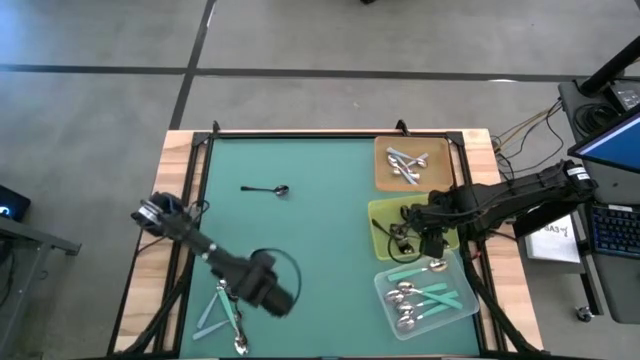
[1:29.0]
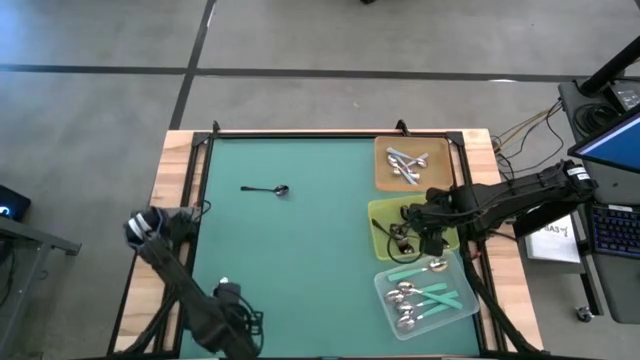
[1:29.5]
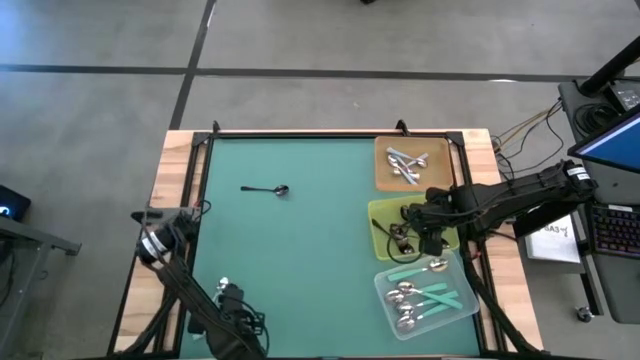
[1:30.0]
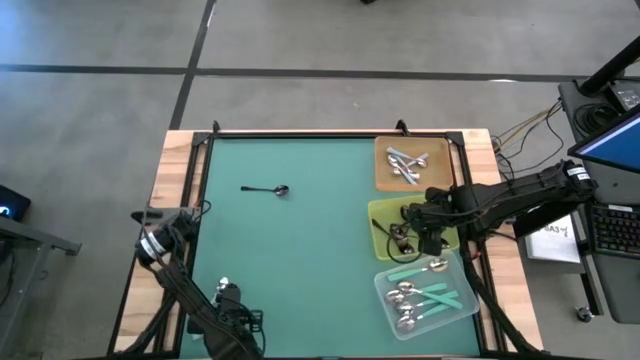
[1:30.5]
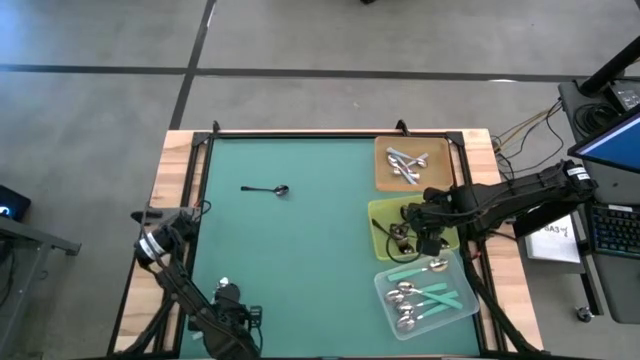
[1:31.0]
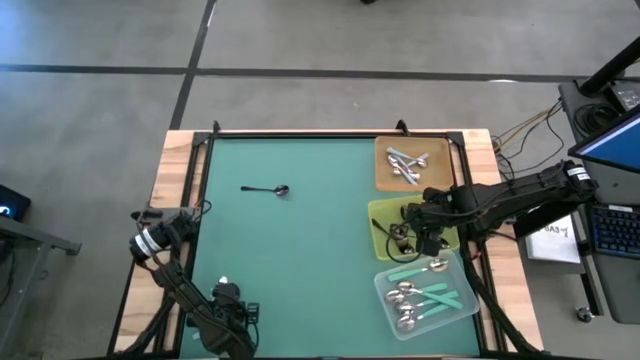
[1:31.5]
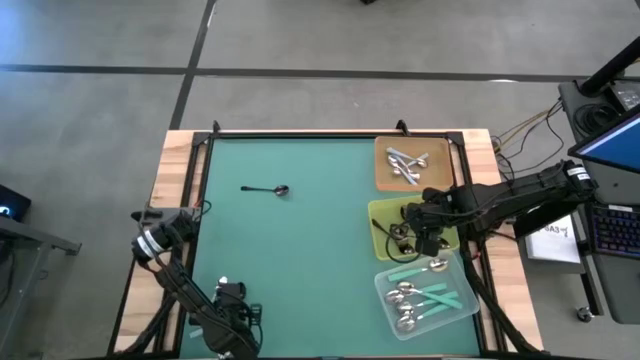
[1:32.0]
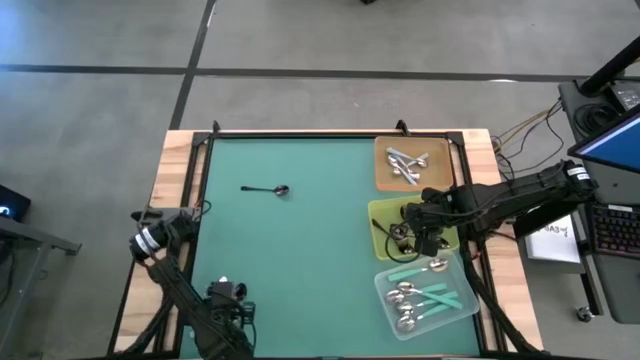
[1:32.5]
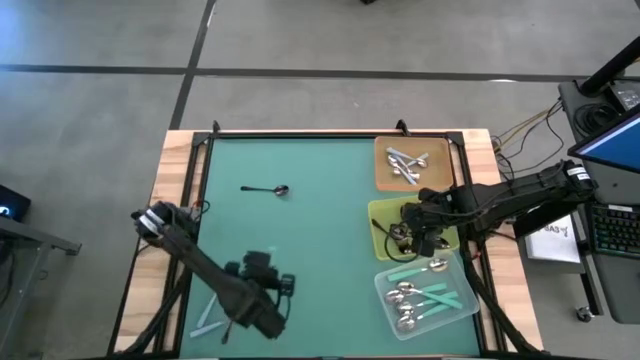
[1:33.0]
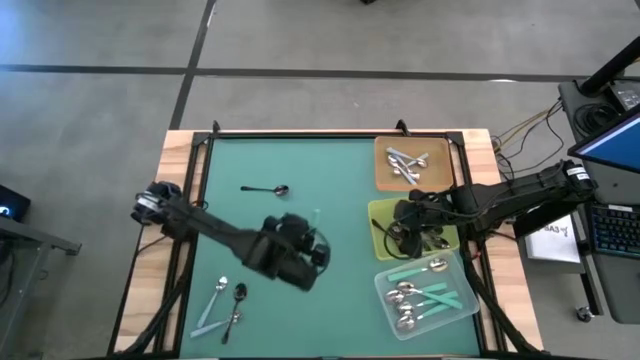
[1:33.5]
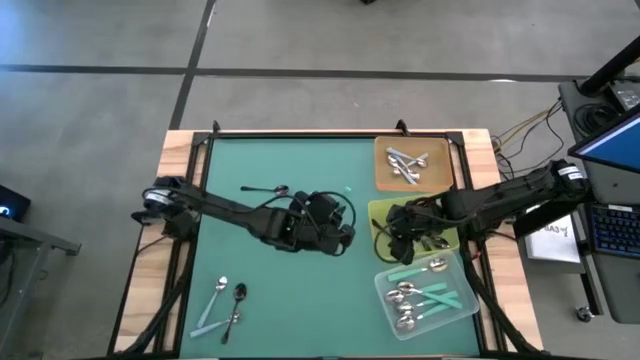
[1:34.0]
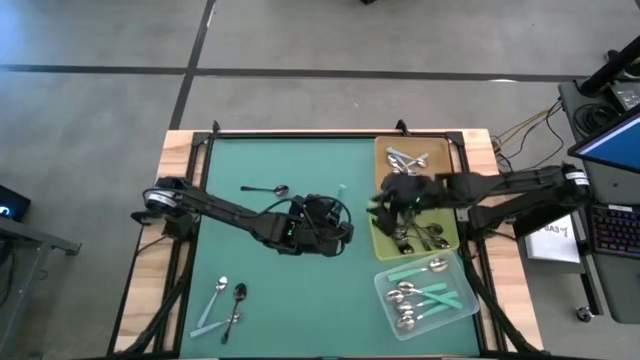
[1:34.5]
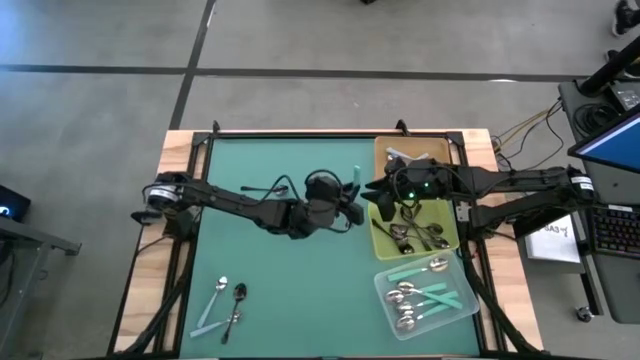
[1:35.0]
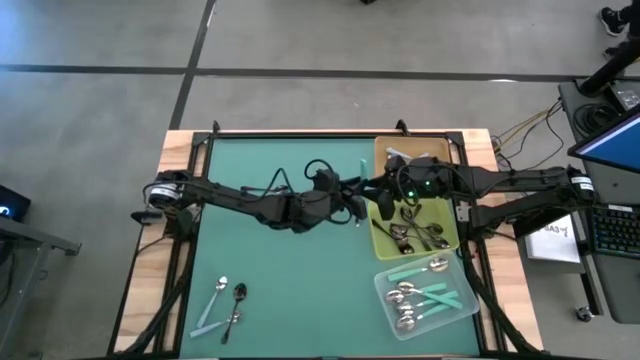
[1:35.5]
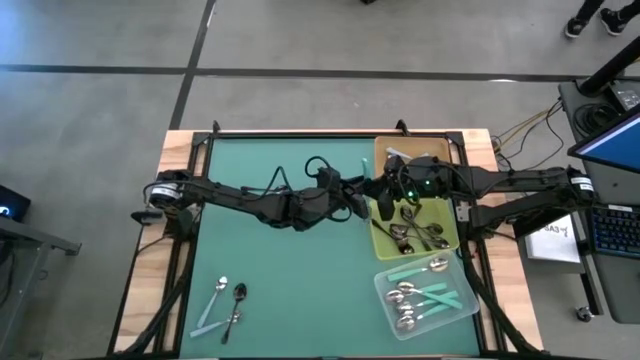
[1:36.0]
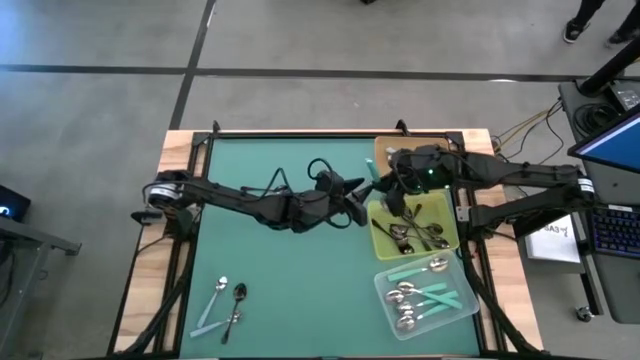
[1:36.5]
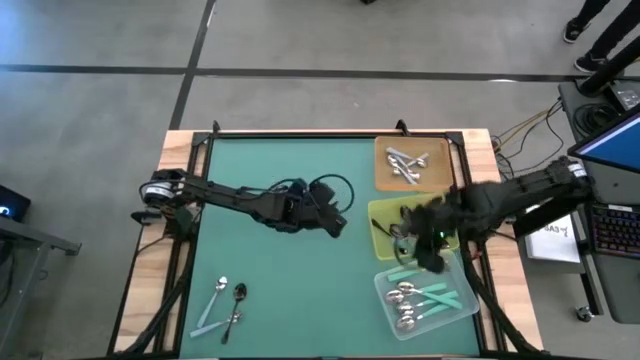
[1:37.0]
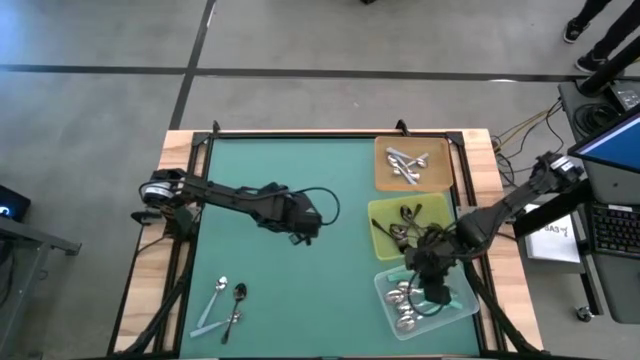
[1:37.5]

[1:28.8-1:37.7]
Task: Sort silverware by color (type)
Put the green spoon into the transparent bin

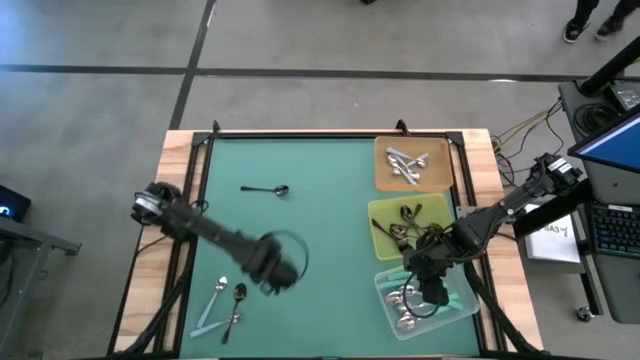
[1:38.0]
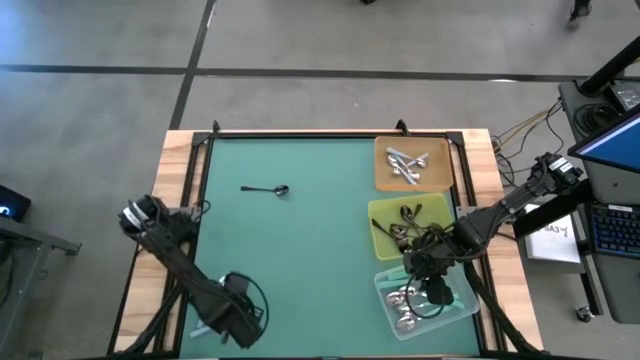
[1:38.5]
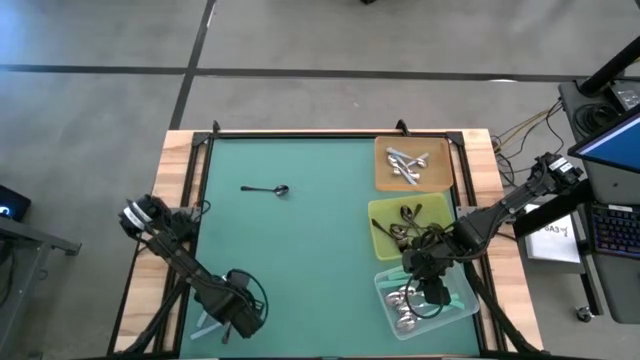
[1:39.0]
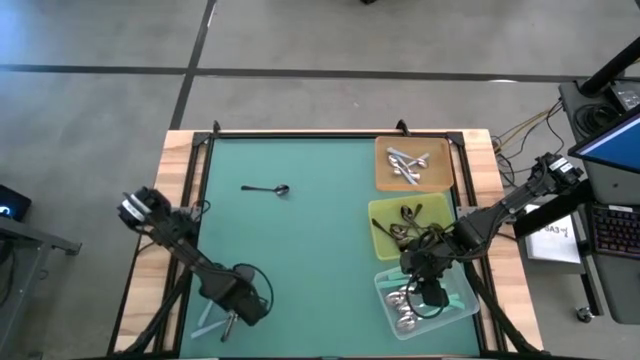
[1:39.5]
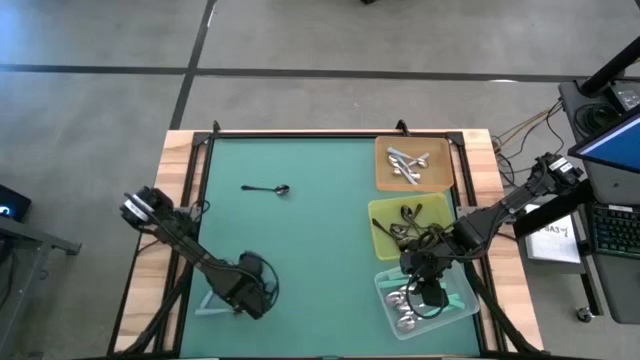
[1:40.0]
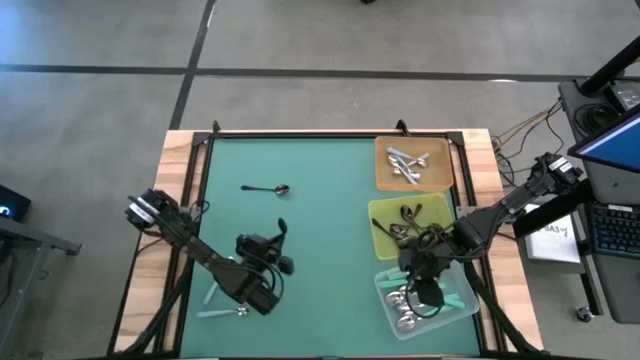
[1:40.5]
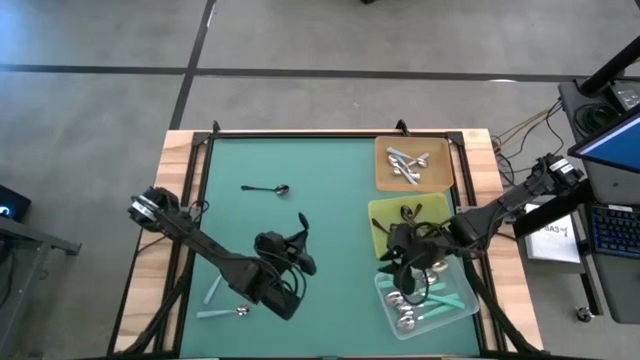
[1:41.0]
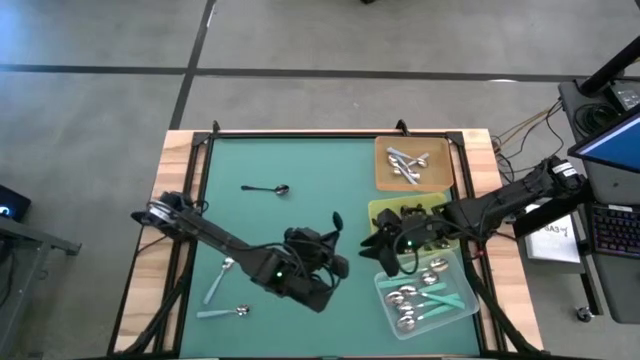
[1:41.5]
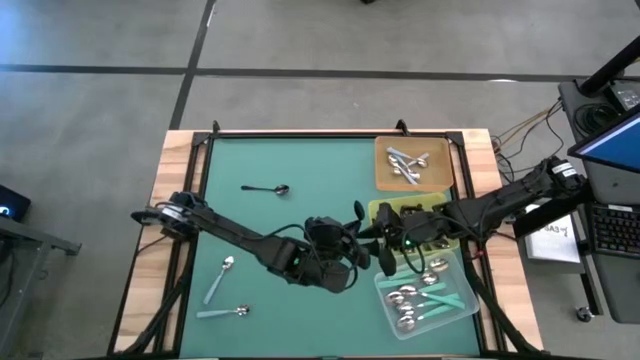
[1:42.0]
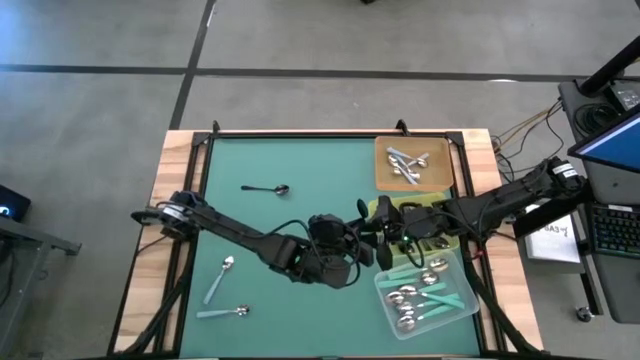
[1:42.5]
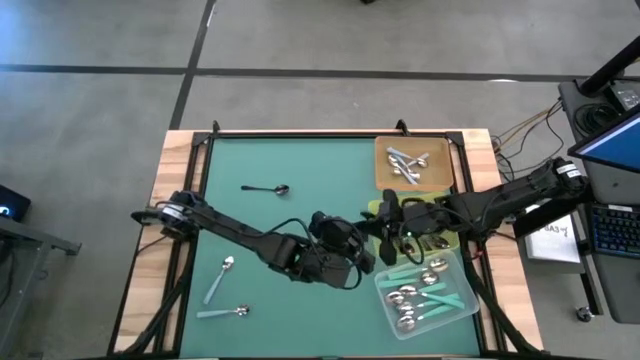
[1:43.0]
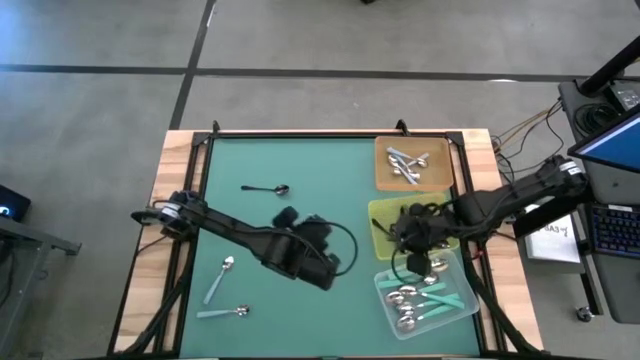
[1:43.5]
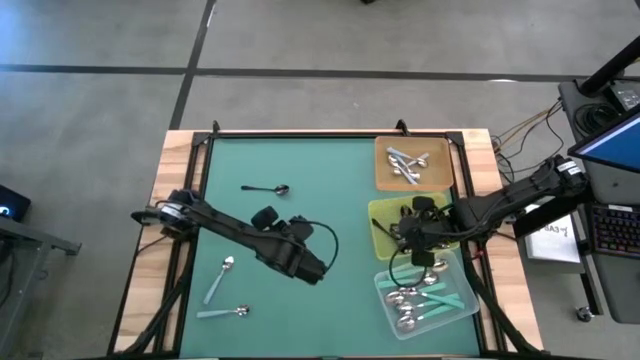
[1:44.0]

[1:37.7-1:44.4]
Put the black spoon into the yellow bin

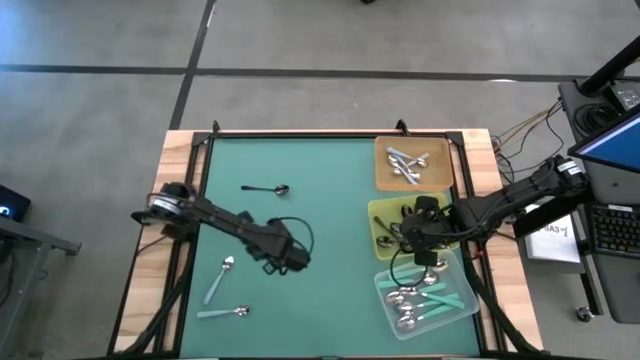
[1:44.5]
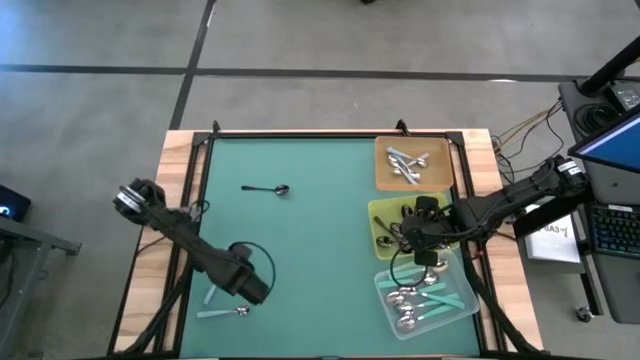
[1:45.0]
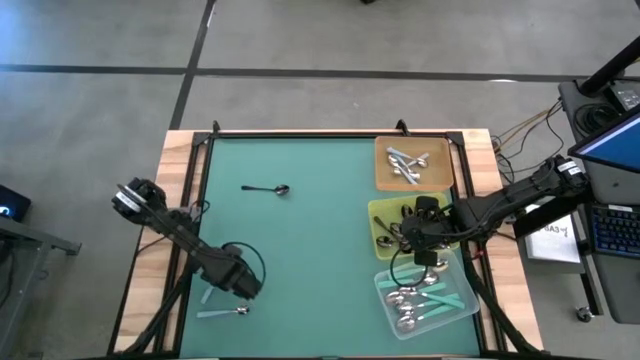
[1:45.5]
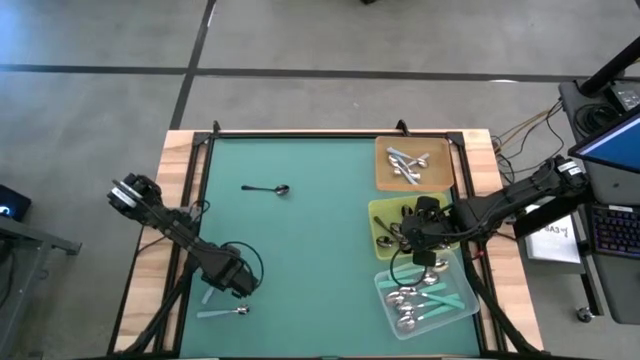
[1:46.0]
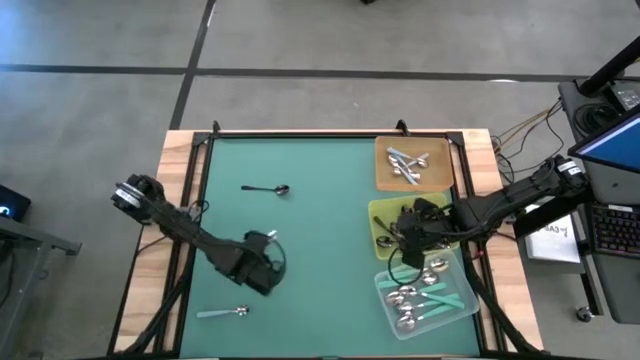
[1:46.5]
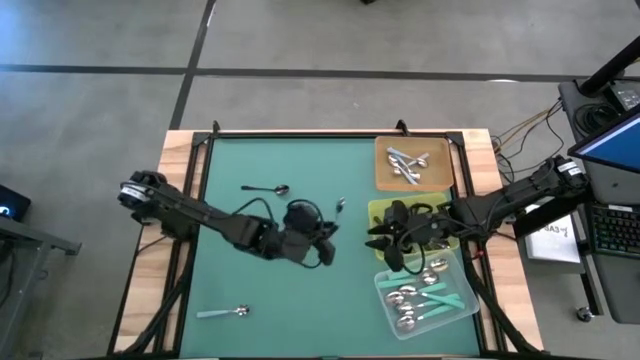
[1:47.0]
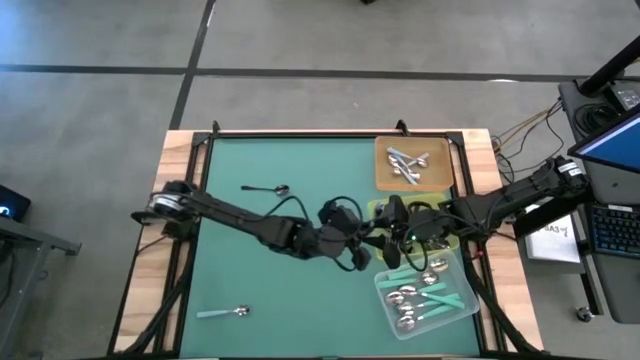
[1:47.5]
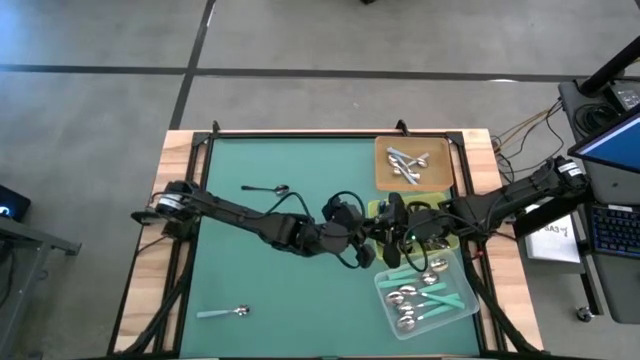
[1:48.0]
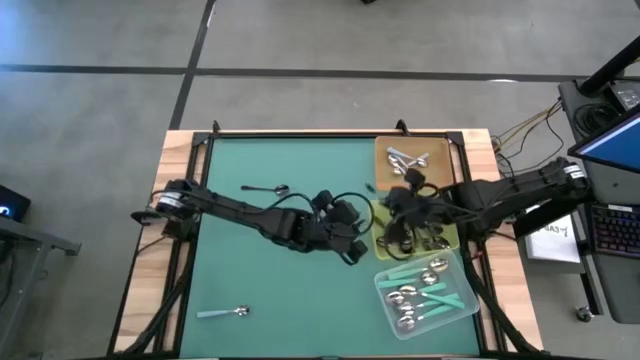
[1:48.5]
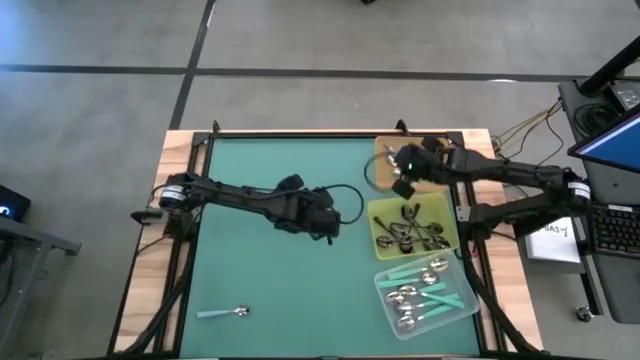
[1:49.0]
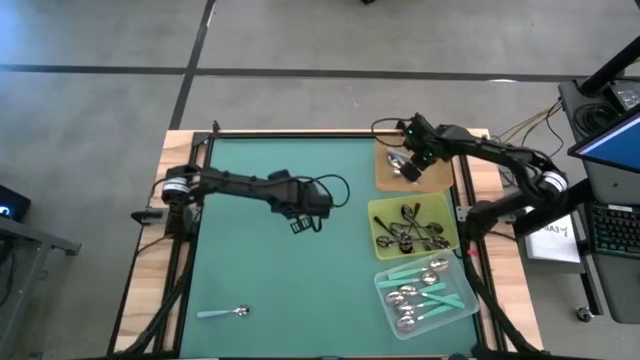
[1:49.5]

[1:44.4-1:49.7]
Put the blue spoon into the orange bin

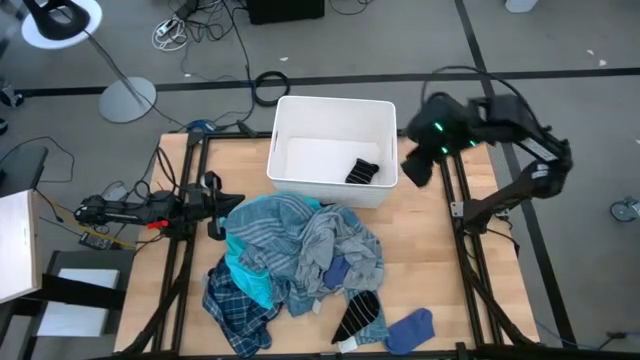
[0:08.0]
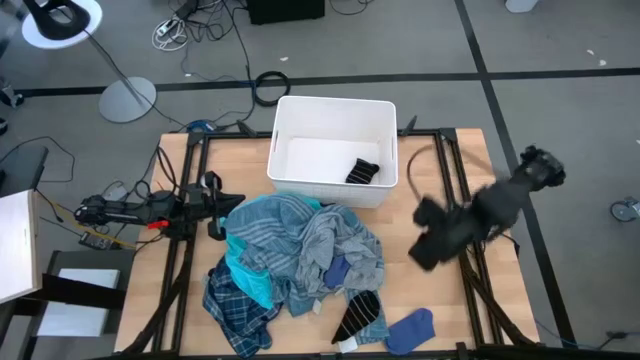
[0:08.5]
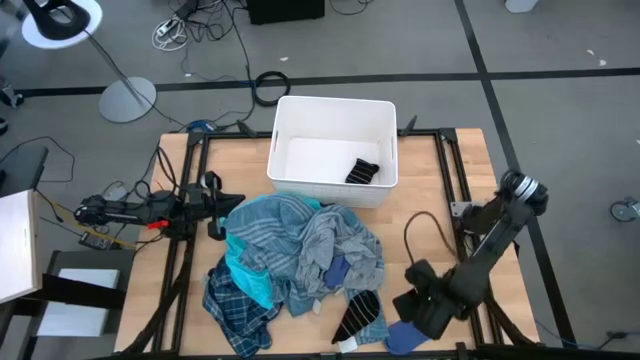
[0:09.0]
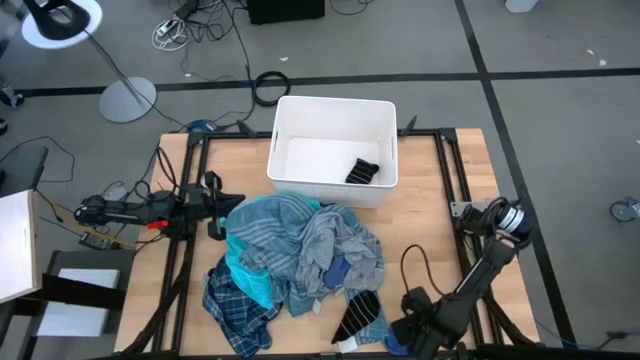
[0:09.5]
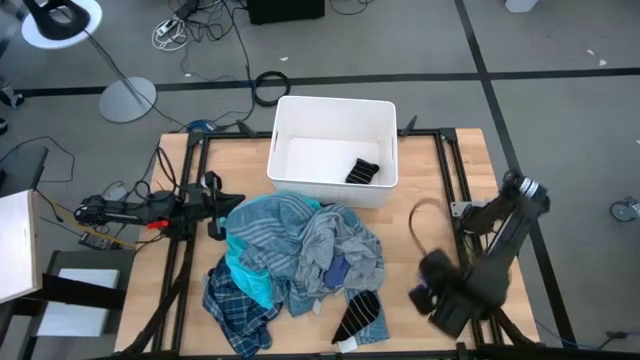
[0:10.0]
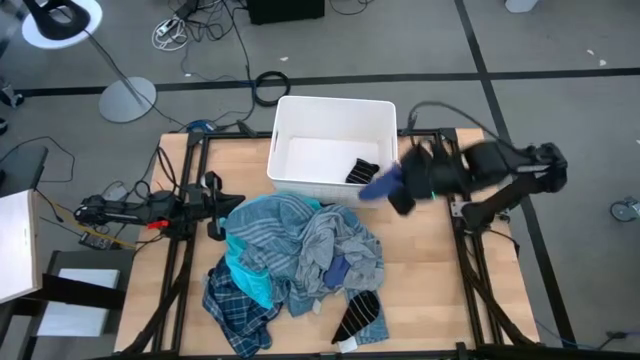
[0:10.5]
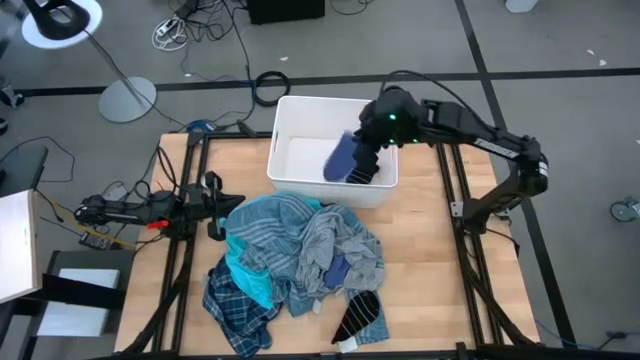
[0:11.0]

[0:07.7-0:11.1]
Task: Sort clothes
Put the right blue sock into the white bin
